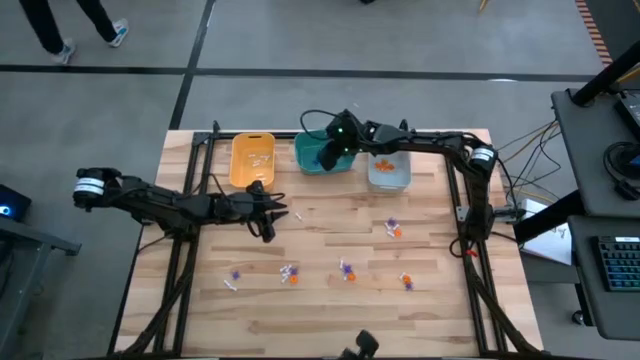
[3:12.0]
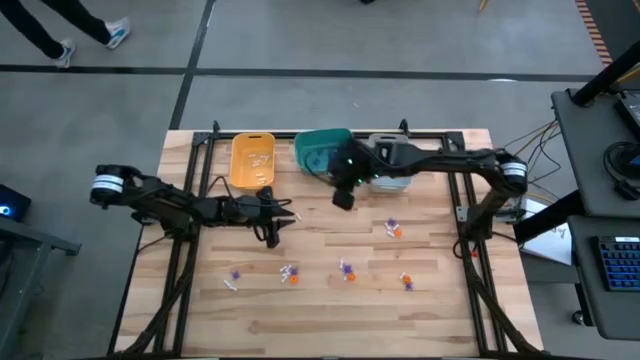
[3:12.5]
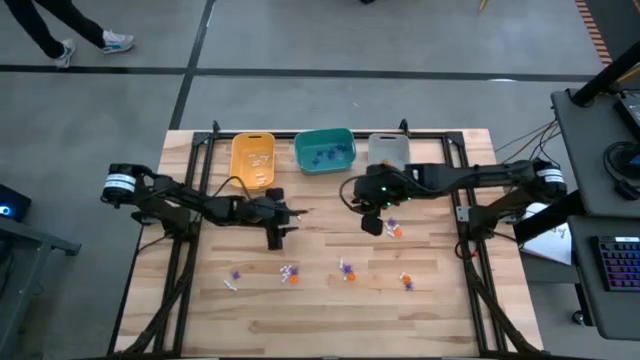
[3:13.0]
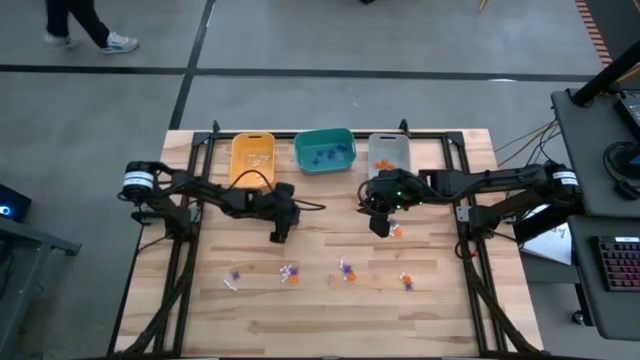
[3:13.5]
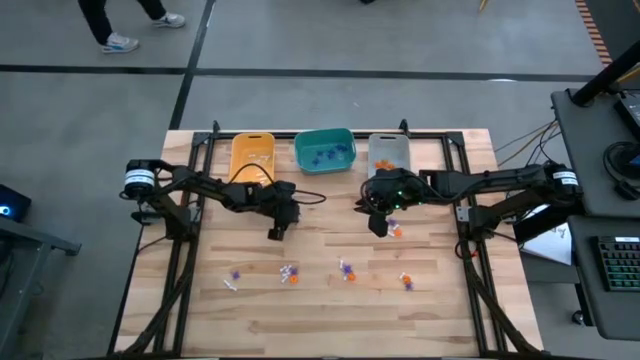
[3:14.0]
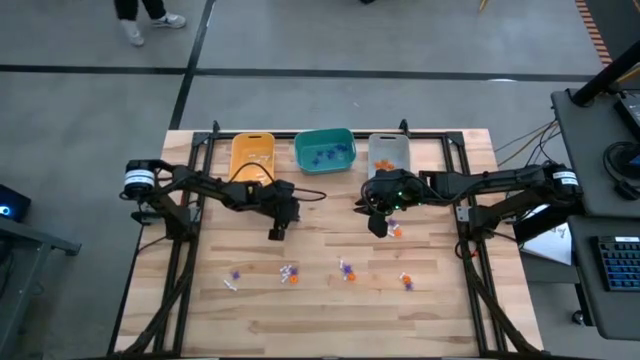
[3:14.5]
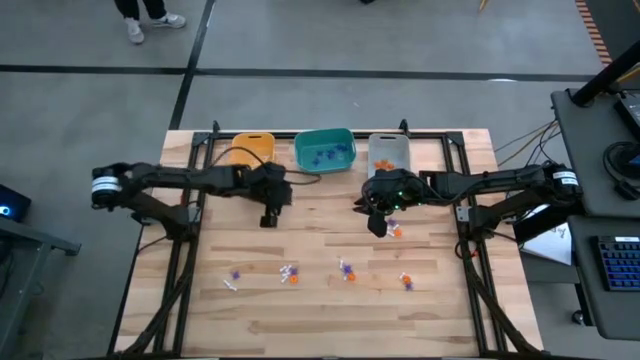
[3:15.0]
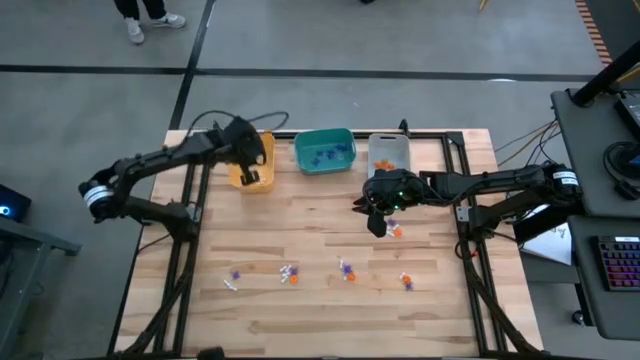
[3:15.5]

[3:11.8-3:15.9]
Task: Sort Halloween decoration
Put the white bone toy into the yellow bin

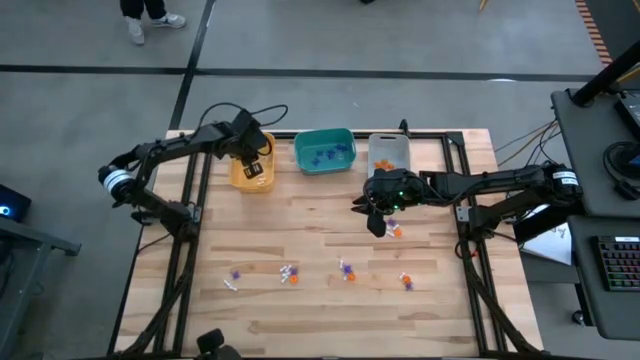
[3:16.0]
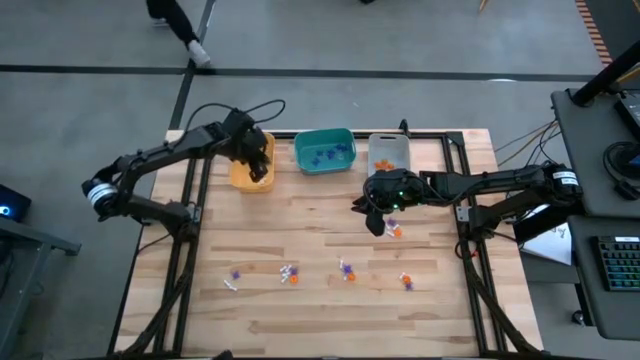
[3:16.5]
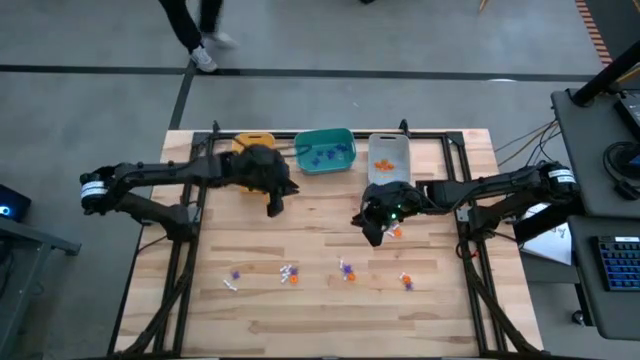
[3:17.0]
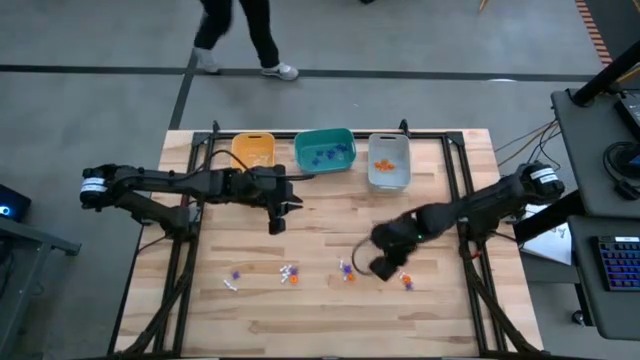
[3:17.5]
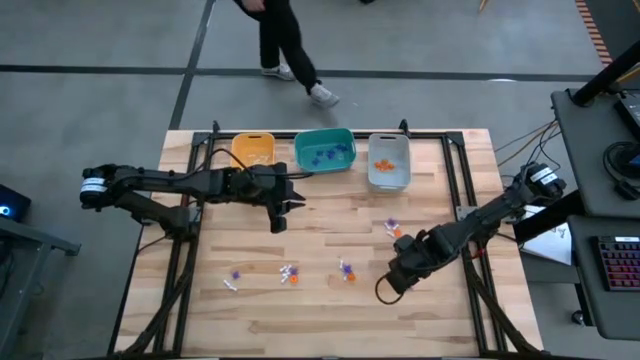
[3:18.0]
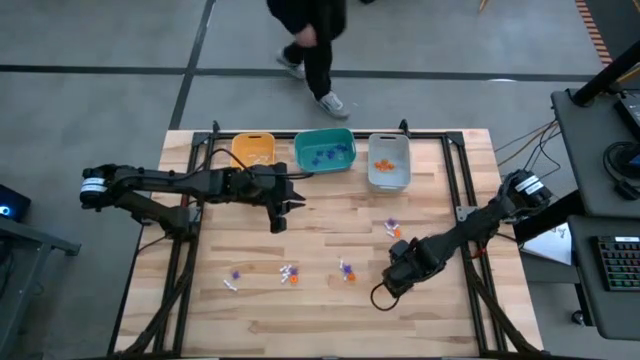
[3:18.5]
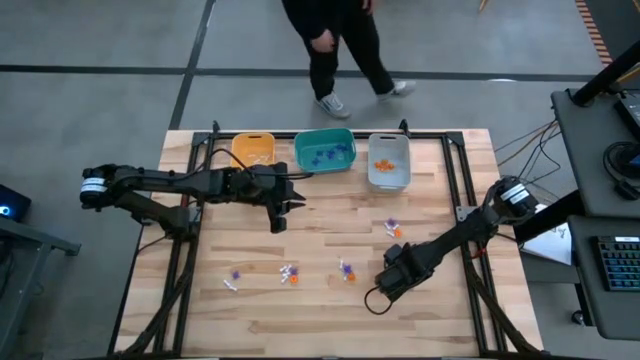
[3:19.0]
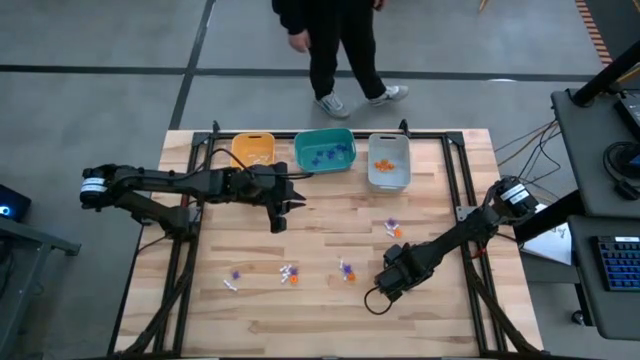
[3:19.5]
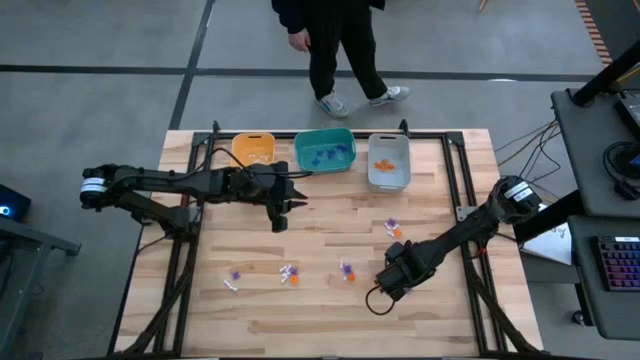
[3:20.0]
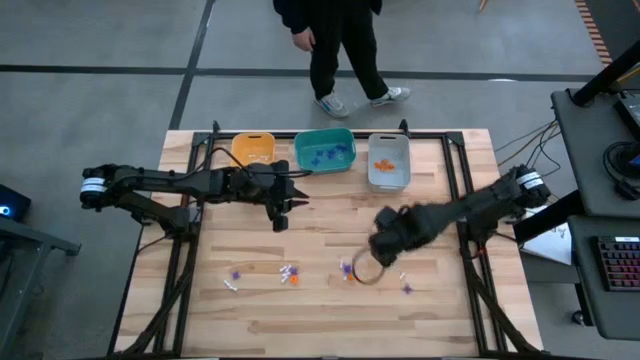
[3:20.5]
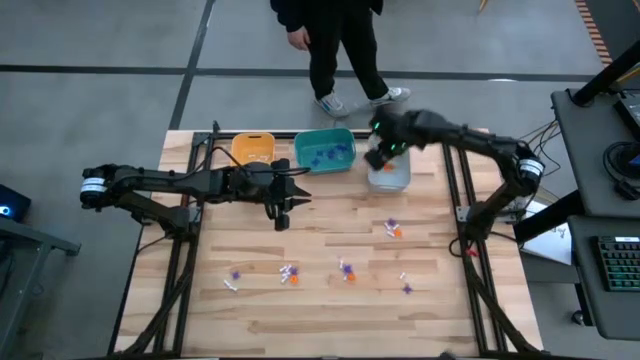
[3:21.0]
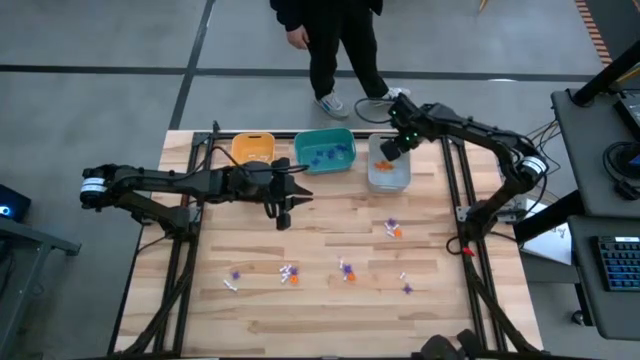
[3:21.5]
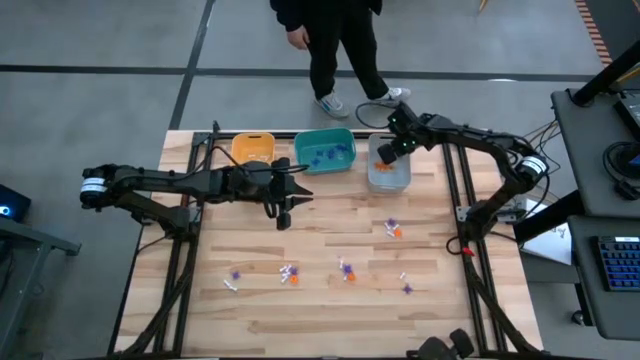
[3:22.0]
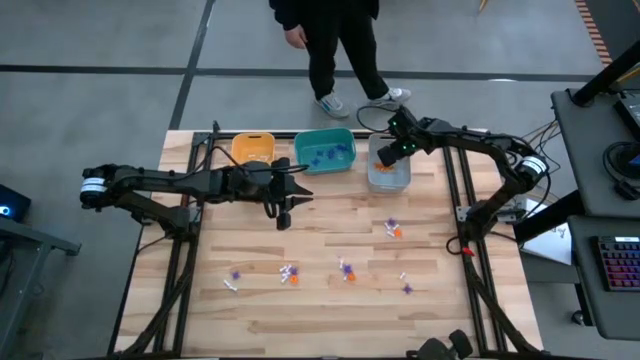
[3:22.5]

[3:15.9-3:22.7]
Put the orange pumpkin into the white bin

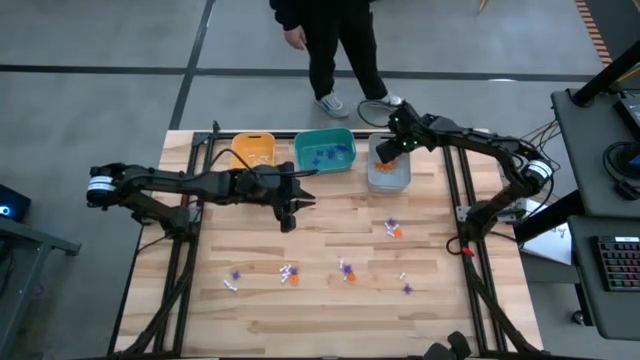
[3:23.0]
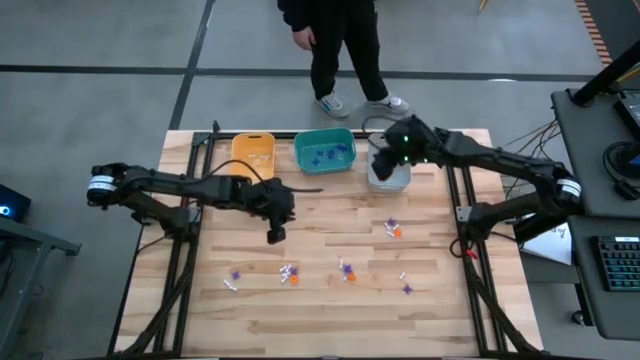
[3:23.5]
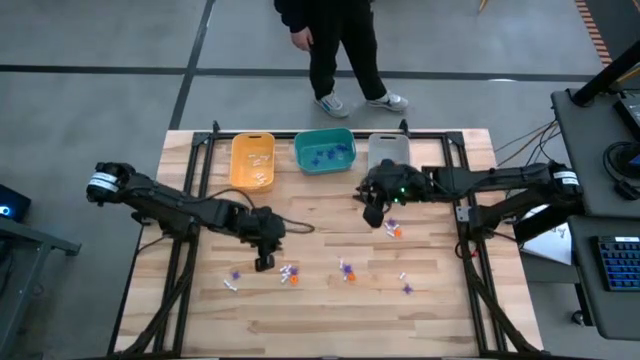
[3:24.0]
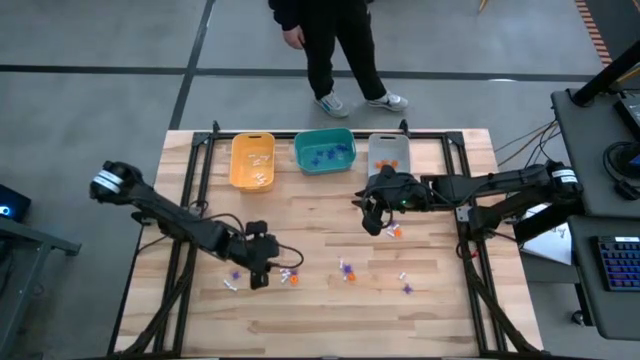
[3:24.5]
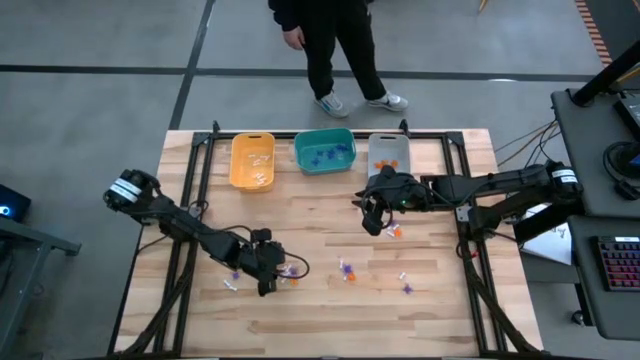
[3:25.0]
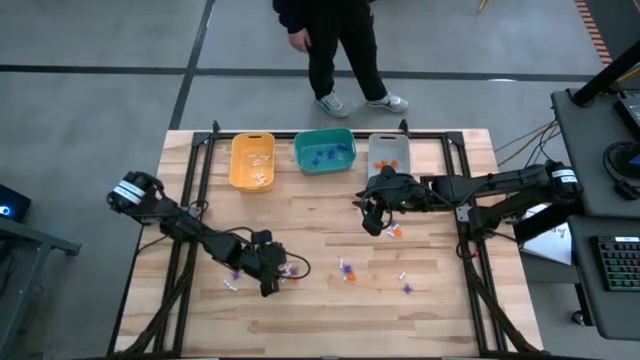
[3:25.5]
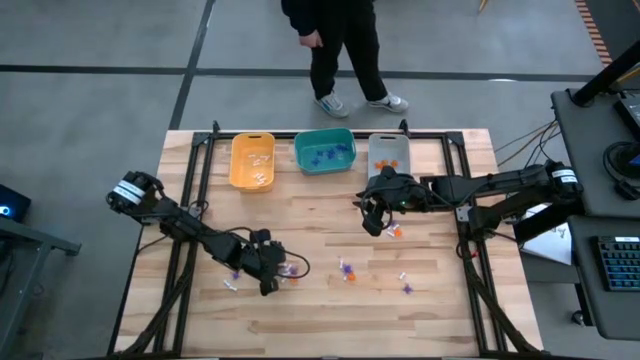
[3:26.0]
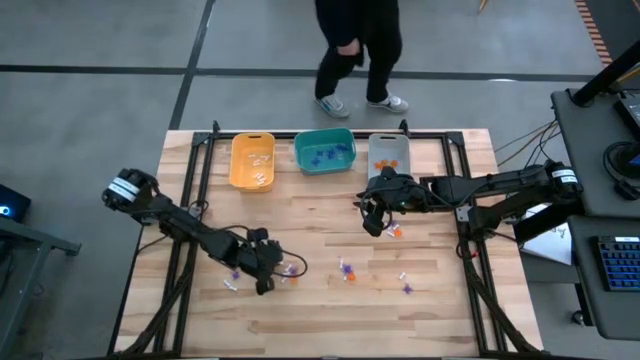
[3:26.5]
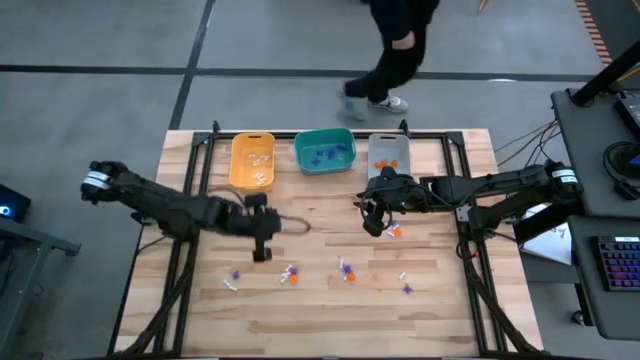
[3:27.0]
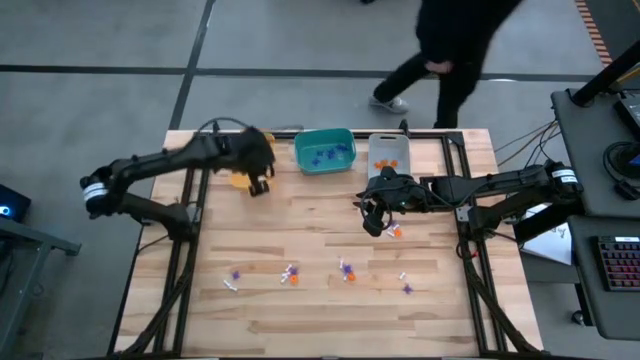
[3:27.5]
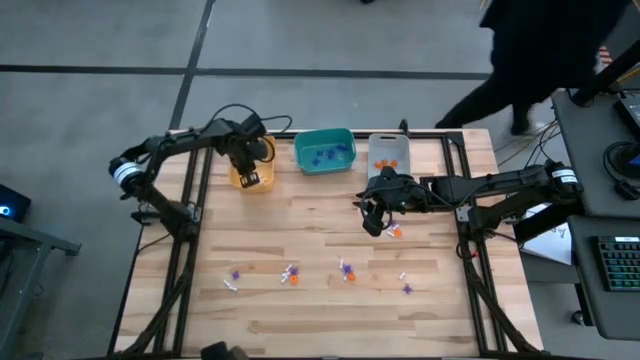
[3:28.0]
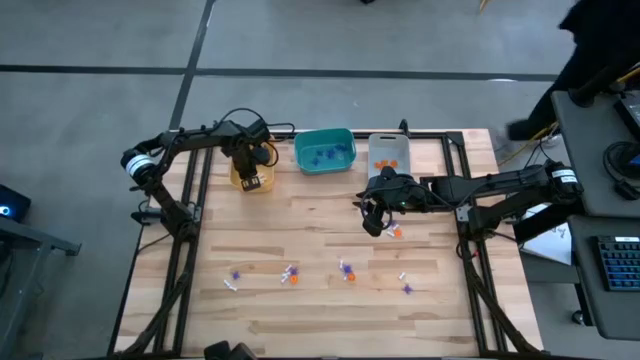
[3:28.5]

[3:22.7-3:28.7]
Put the white bone toy into the yellow bin

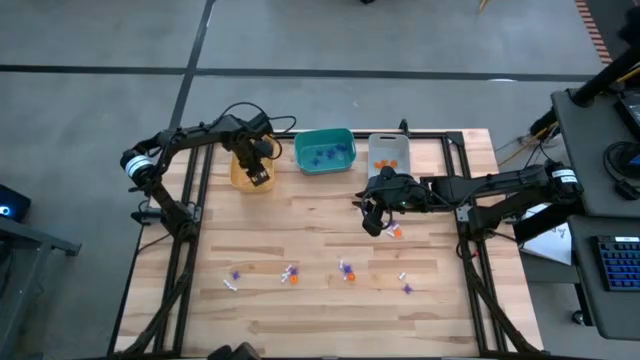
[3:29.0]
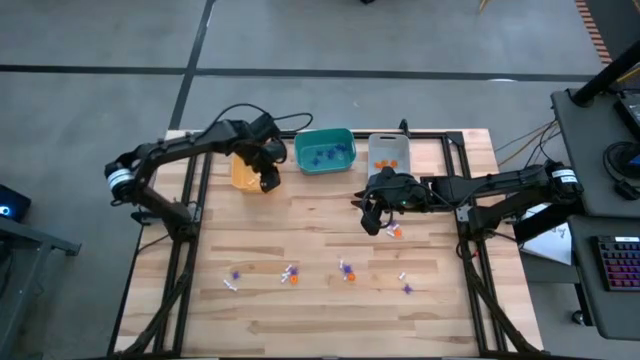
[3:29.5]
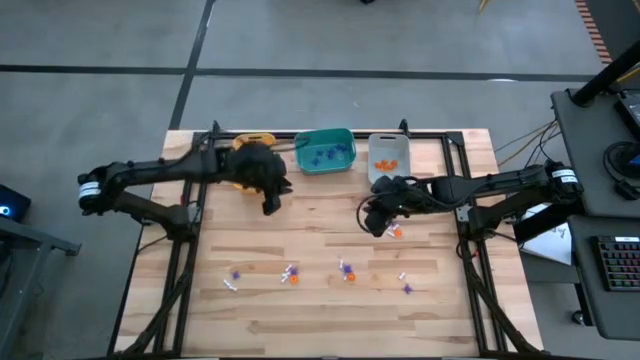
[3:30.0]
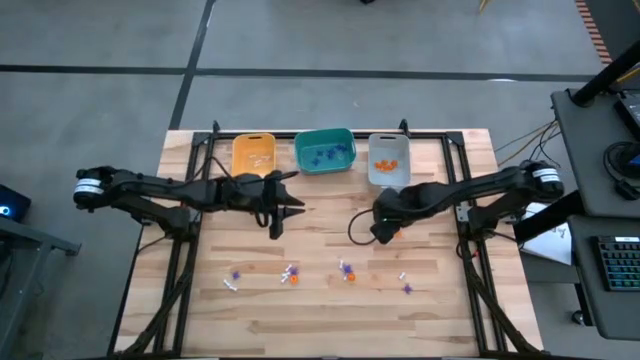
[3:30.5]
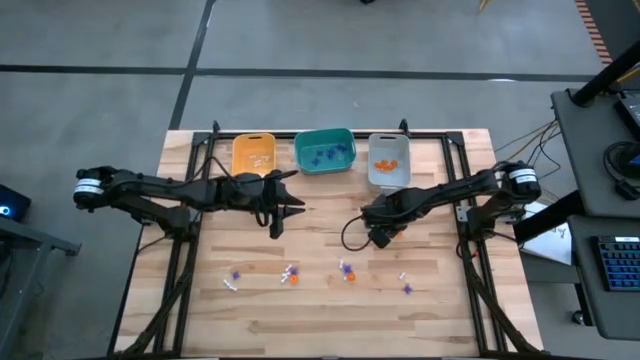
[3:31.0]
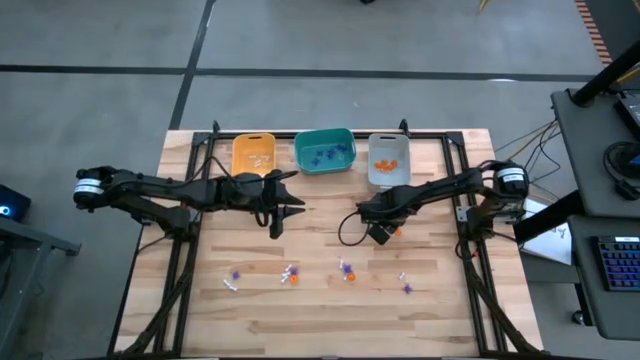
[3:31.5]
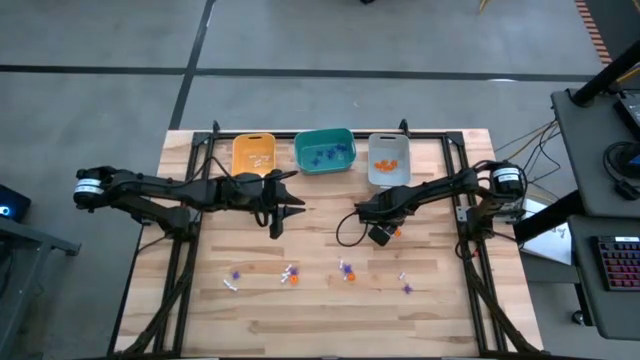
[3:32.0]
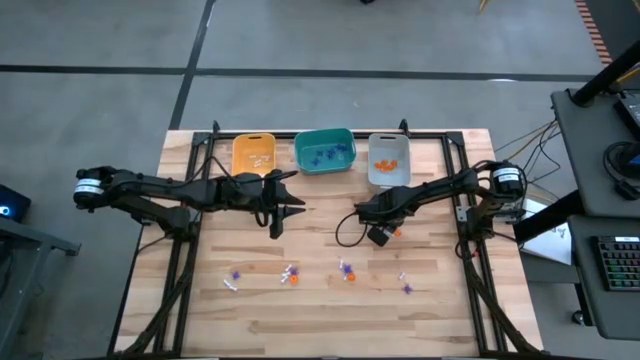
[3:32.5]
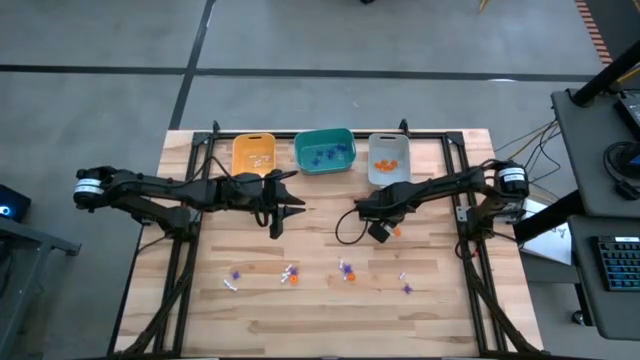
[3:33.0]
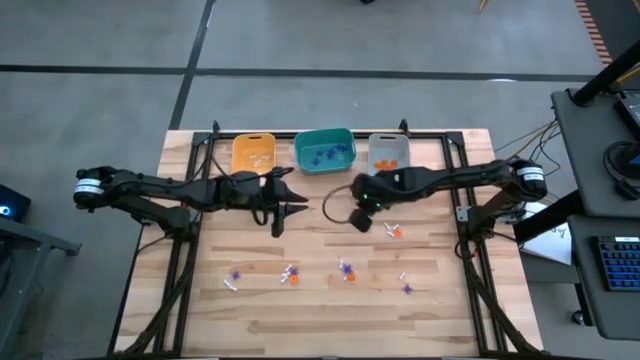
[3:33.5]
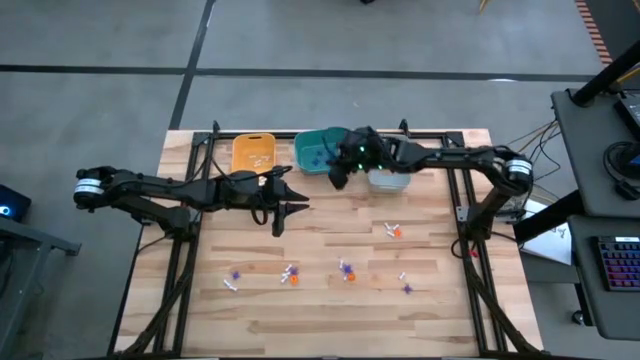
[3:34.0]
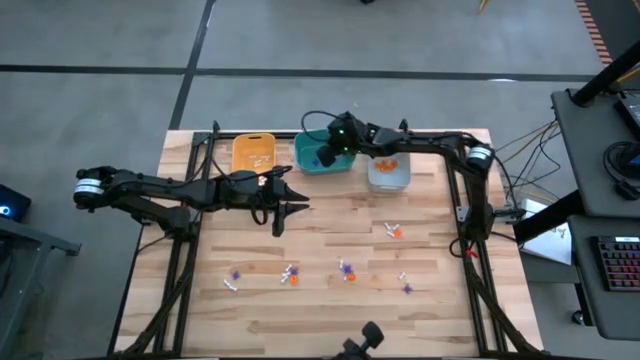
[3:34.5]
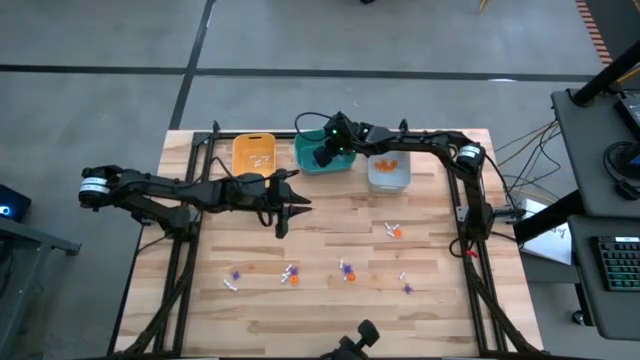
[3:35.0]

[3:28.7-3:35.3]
Put the violet spider toy into the green bin
